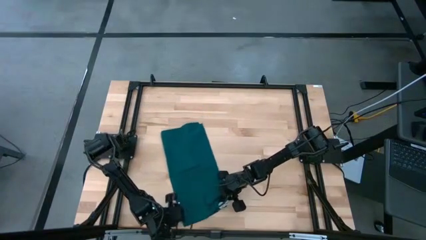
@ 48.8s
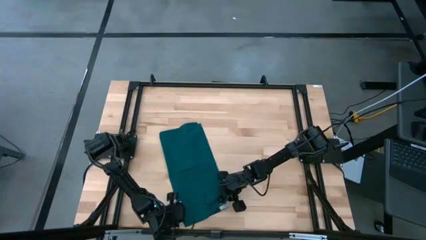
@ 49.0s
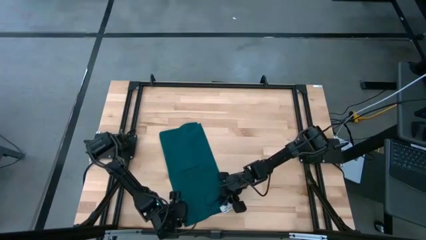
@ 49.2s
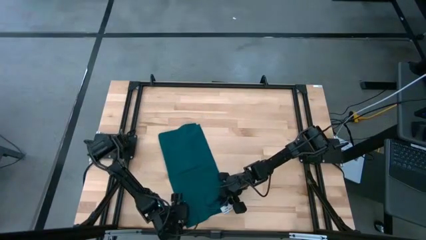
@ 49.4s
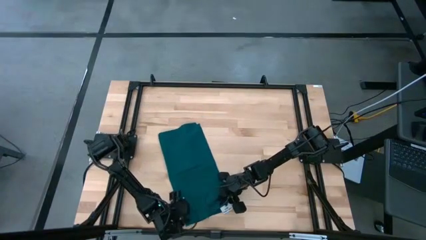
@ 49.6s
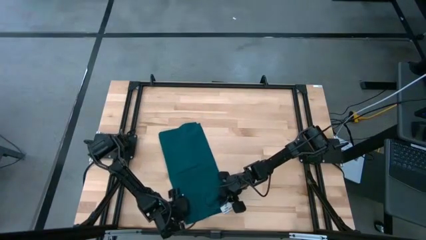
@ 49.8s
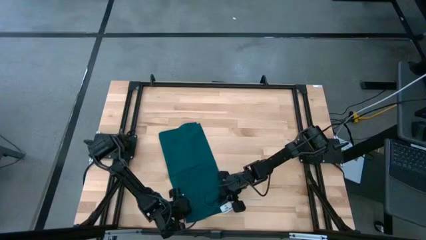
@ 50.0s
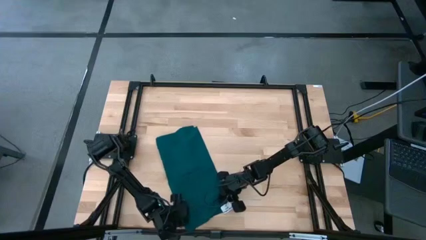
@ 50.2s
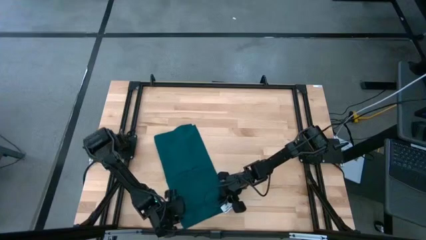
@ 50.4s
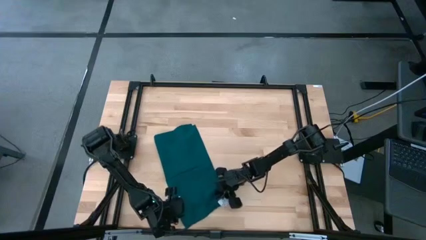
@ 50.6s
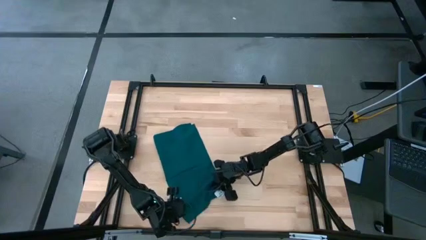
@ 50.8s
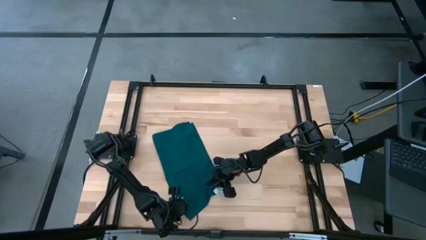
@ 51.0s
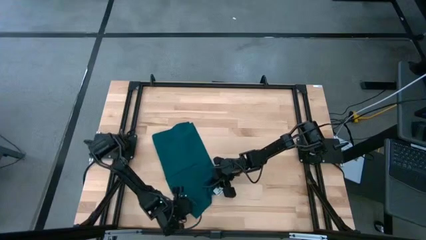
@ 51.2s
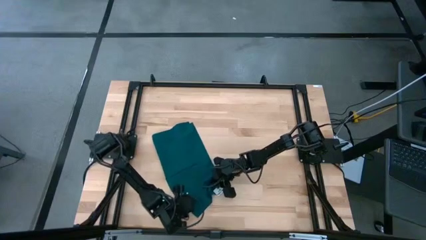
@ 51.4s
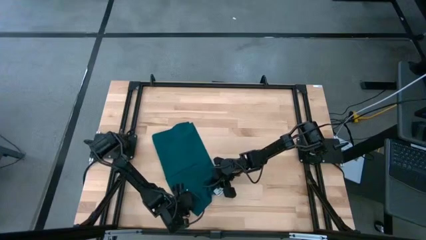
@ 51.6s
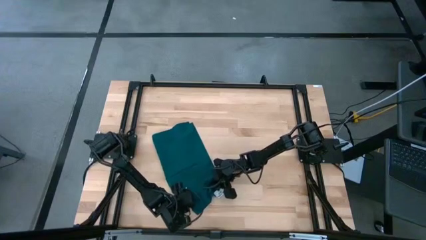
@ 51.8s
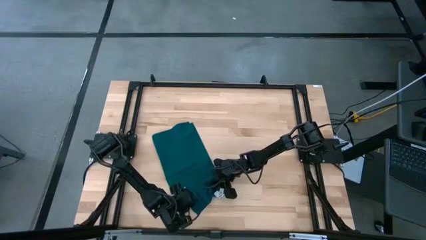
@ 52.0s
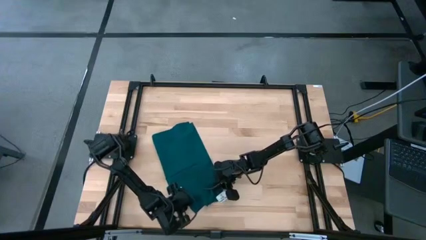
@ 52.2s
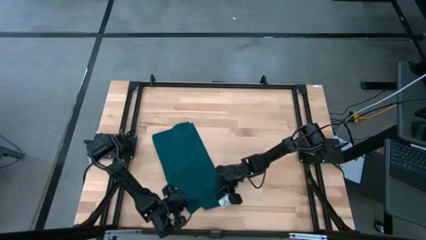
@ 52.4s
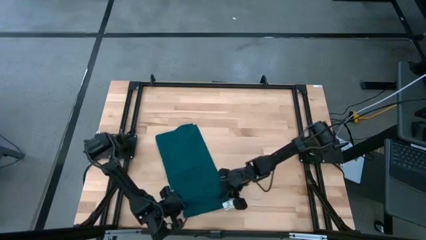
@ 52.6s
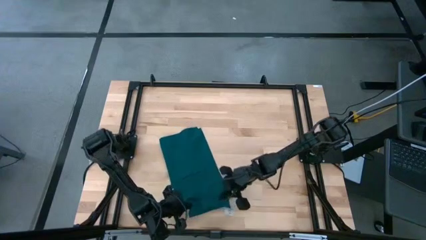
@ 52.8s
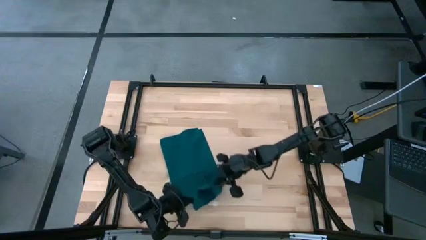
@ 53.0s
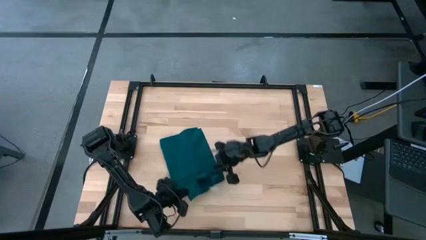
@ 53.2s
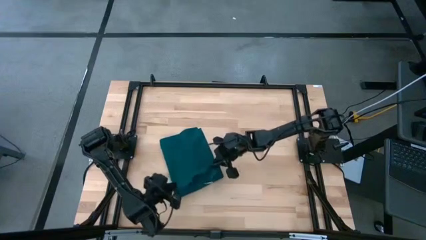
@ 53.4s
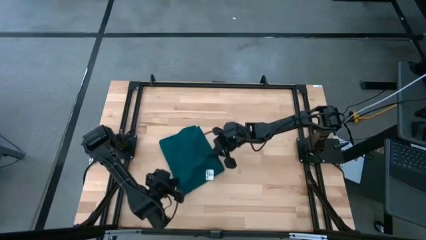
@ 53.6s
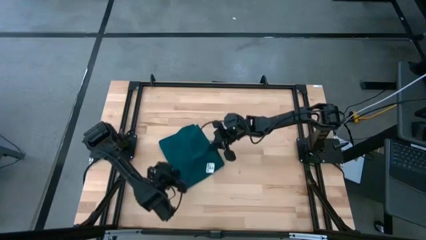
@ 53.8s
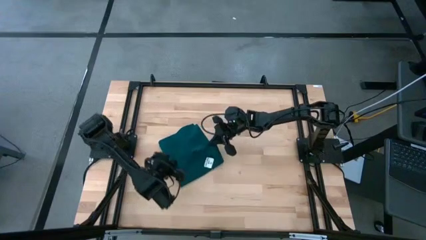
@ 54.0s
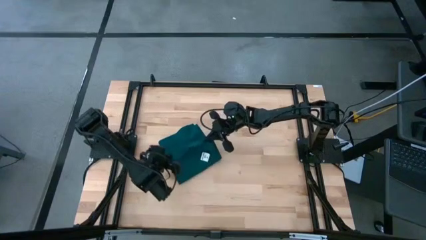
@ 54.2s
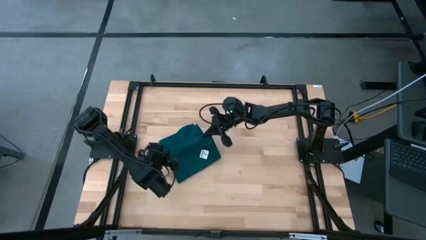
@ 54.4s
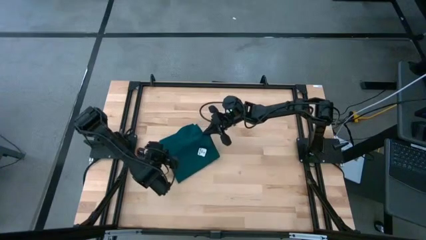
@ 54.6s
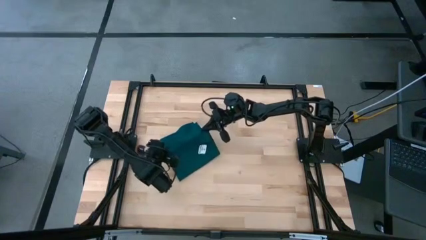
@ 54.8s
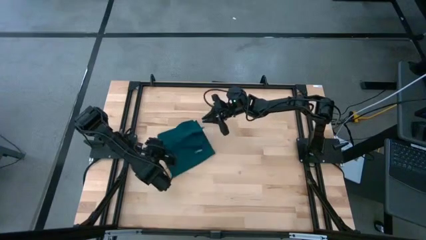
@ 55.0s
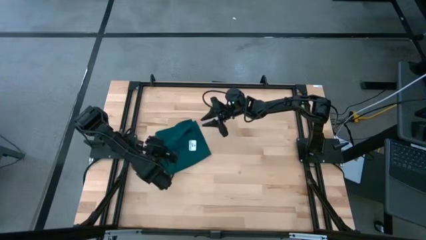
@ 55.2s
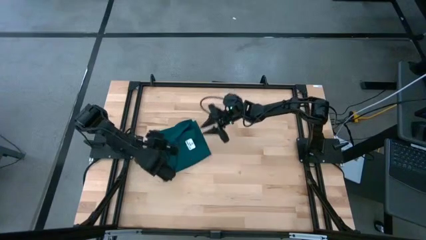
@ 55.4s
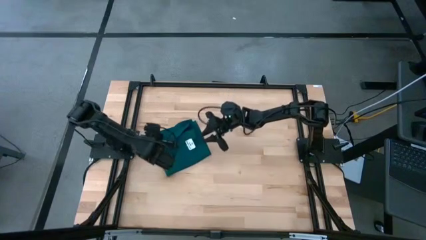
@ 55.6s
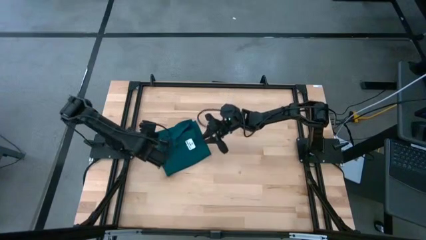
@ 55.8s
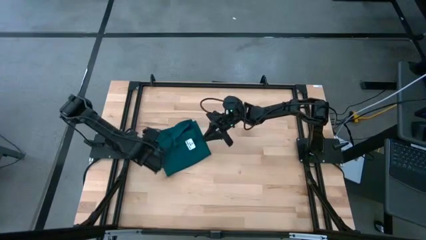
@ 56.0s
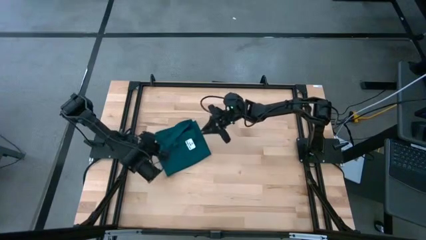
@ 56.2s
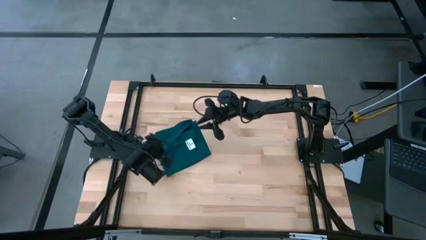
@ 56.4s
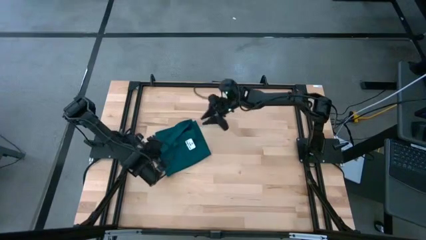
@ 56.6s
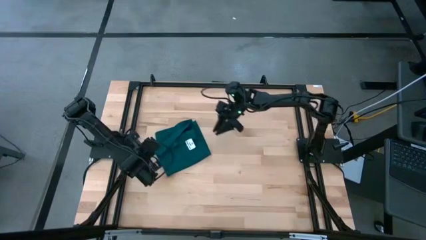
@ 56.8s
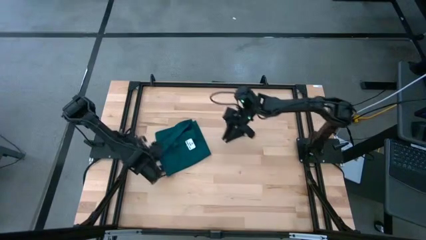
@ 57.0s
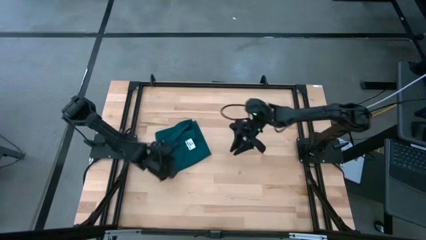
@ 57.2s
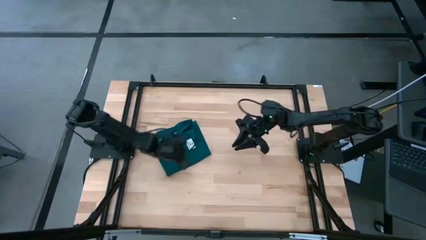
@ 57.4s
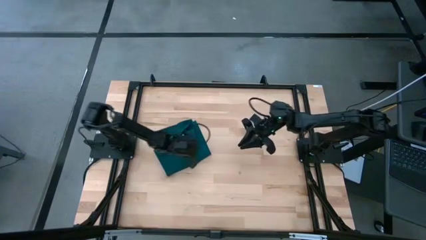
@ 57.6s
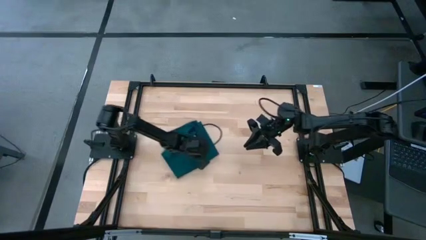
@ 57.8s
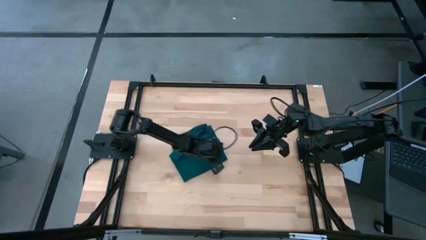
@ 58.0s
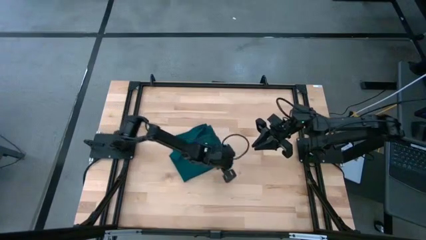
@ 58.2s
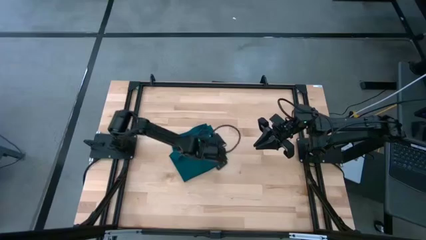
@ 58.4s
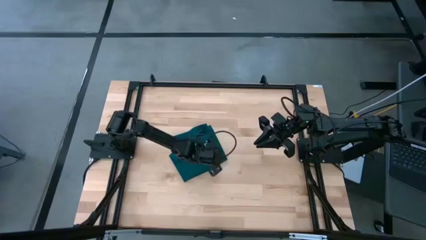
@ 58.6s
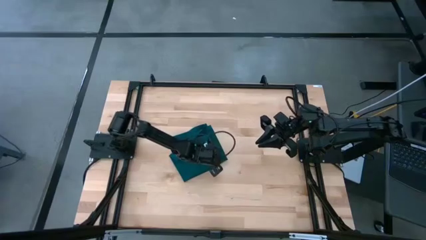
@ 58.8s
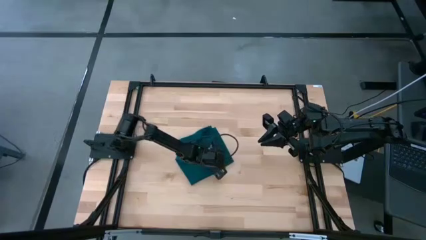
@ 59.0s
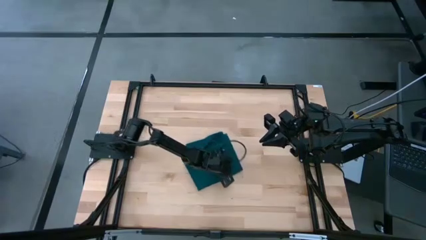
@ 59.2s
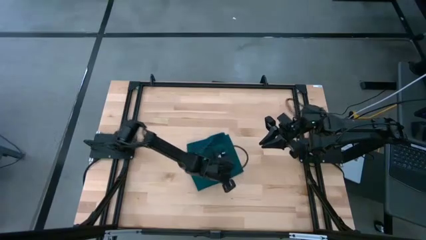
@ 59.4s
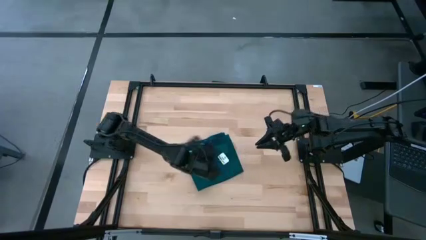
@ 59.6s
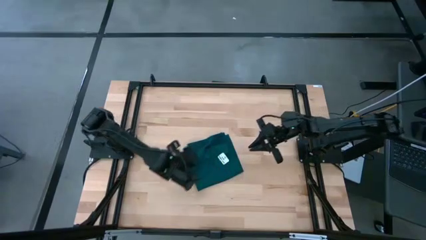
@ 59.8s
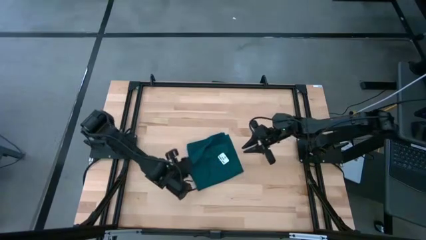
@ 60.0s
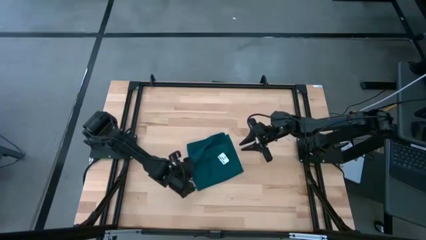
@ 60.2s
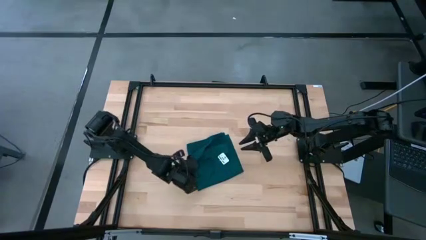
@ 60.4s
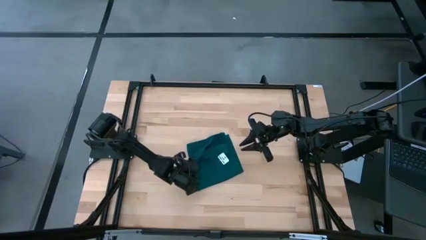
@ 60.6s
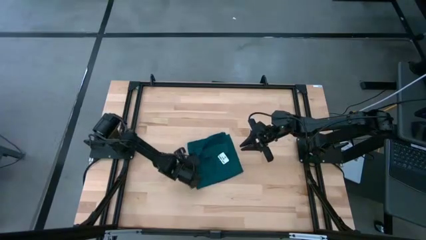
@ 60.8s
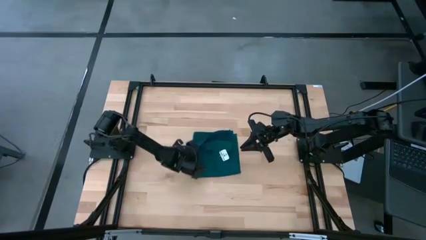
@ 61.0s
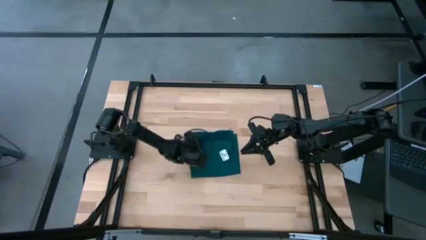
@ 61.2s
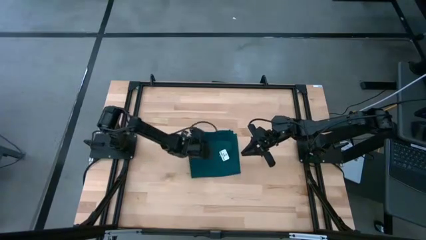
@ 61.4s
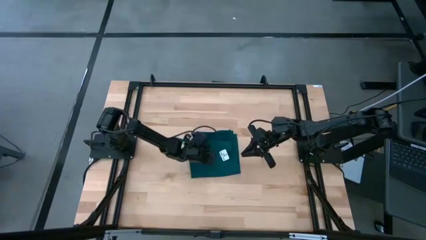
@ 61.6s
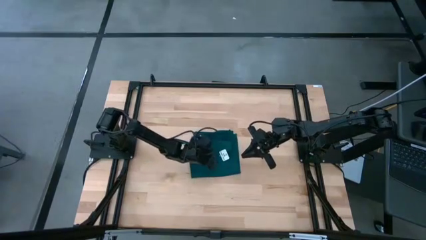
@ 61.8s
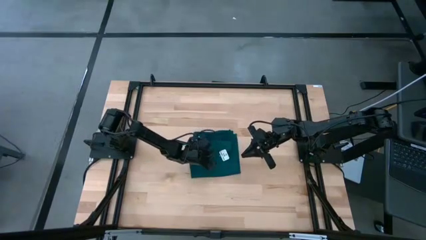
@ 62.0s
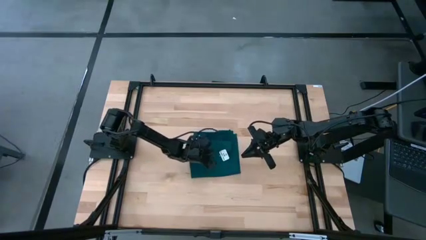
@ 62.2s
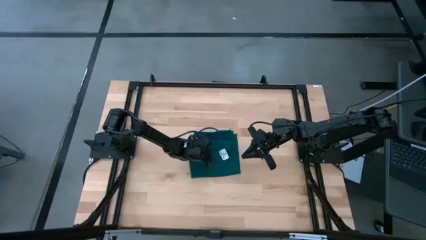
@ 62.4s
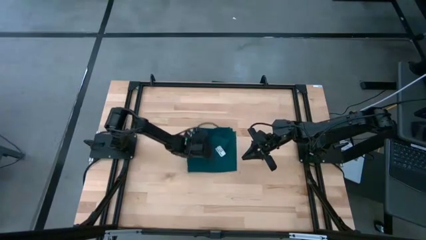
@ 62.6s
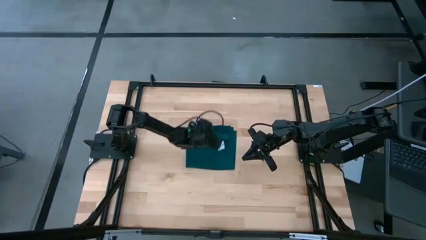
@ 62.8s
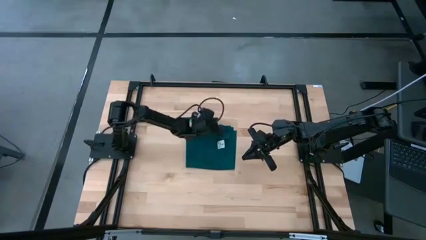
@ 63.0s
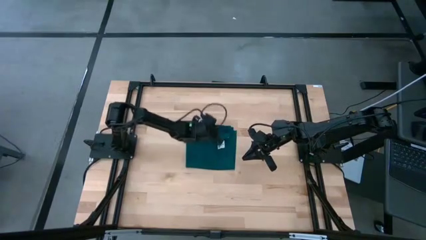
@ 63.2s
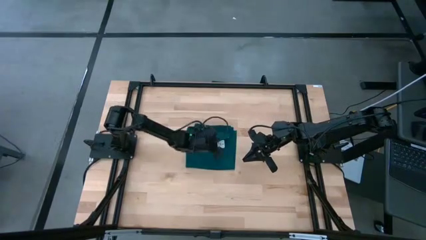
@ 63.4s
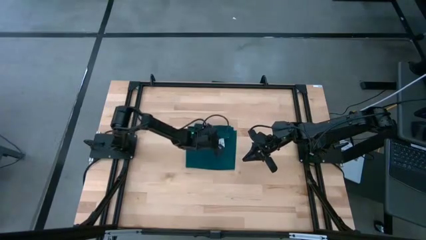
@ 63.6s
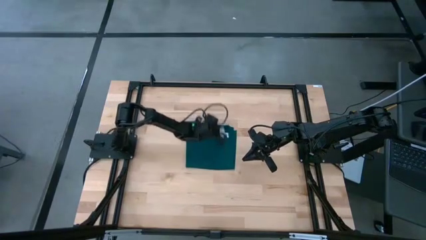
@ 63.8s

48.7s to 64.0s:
Task: Fold microfiber towels
Fold the green napkin

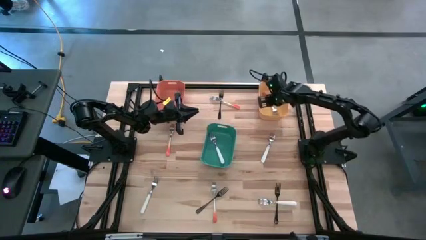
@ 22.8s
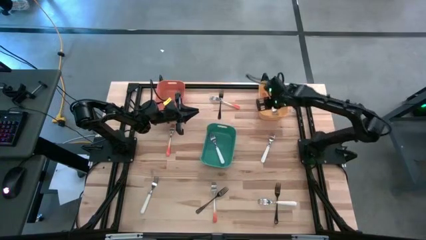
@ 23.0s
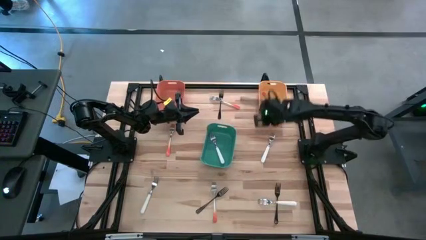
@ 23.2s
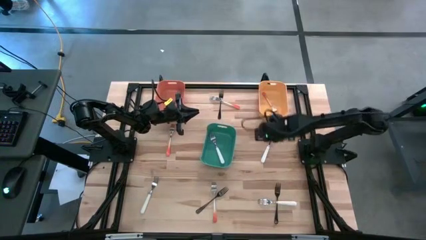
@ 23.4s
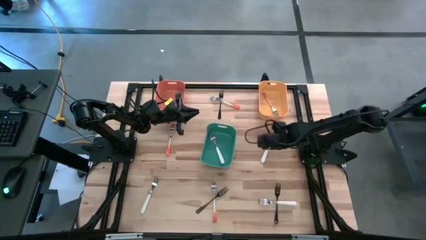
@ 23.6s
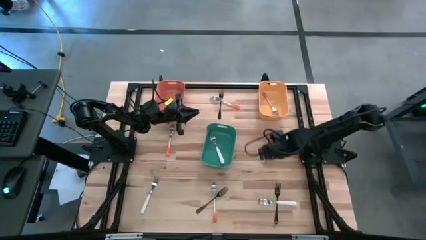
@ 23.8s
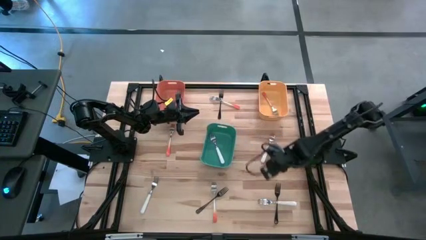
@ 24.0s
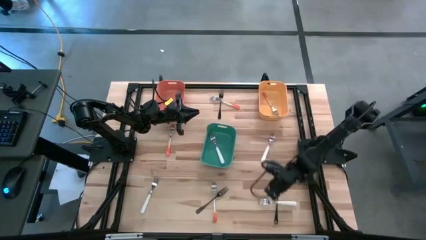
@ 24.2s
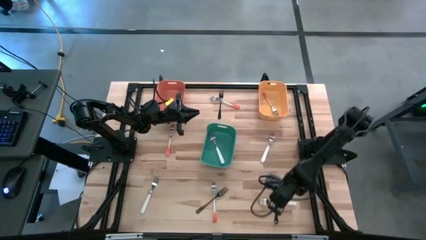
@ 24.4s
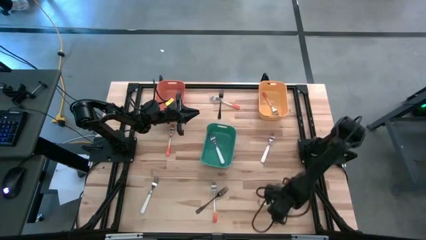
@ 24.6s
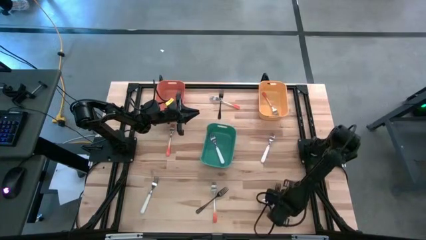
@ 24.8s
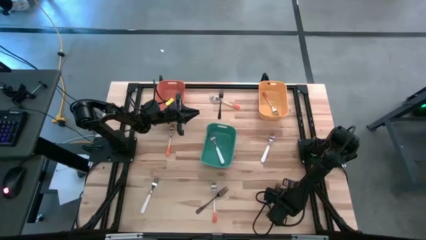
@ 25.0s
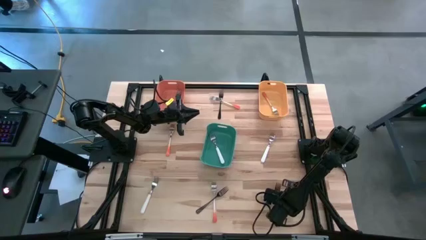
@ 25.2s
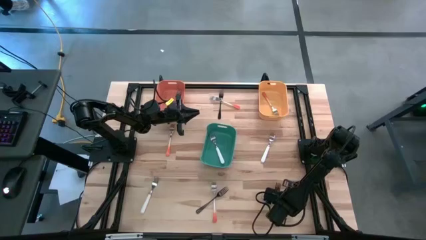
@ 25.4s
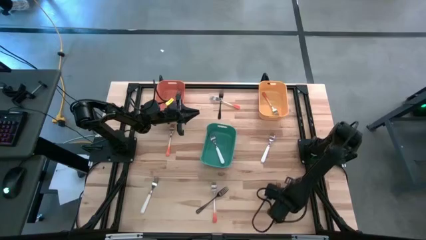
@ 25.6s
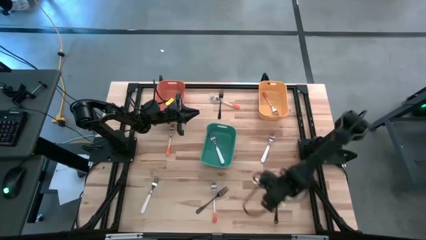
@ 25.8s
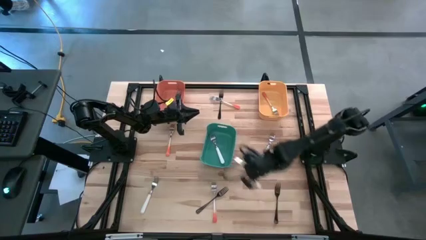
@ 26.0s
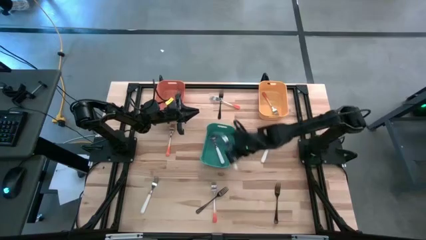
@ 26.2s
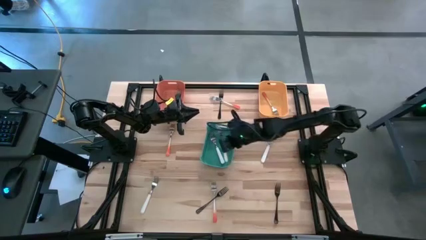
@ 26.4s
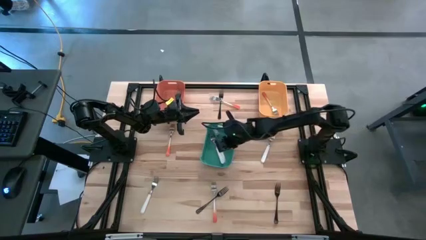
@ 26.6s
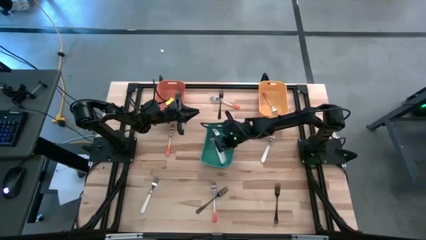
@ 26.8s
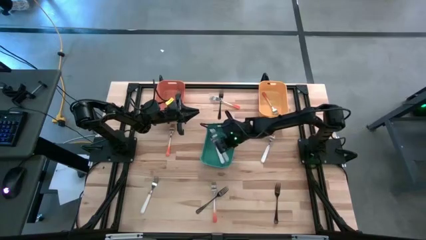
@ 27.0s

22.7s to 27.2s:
Task: Sort silverware by color (type)
Put the bottom right white fork into the green bin
